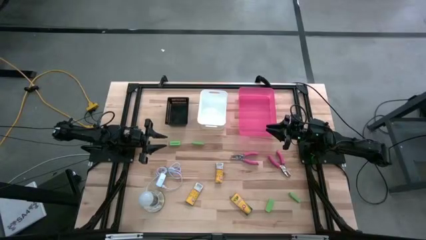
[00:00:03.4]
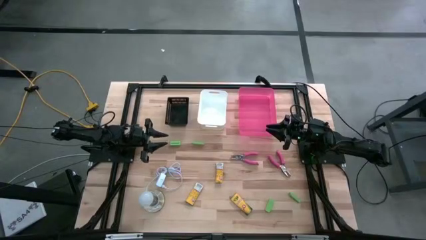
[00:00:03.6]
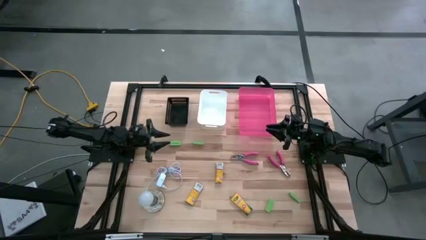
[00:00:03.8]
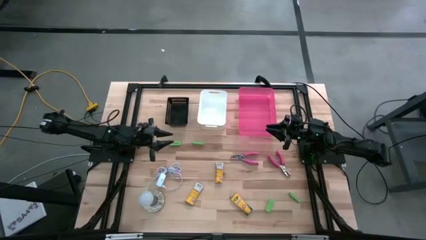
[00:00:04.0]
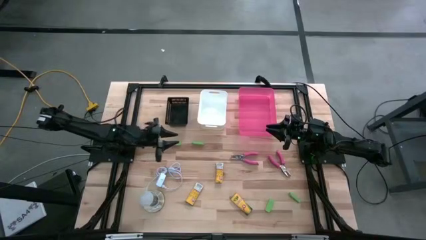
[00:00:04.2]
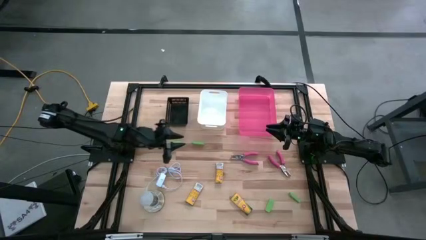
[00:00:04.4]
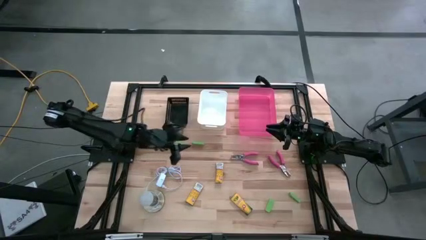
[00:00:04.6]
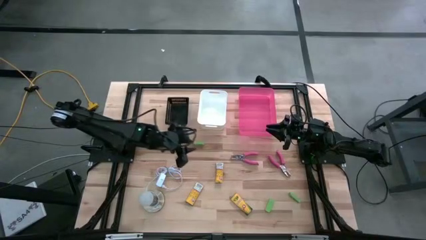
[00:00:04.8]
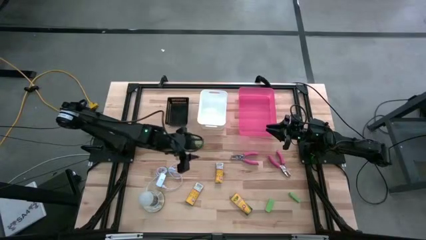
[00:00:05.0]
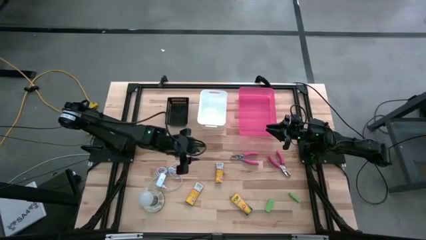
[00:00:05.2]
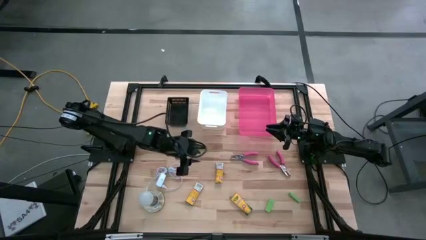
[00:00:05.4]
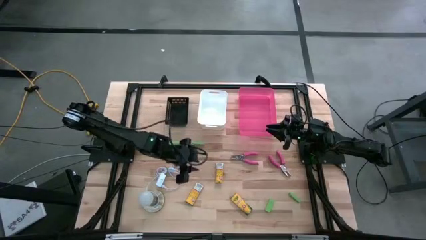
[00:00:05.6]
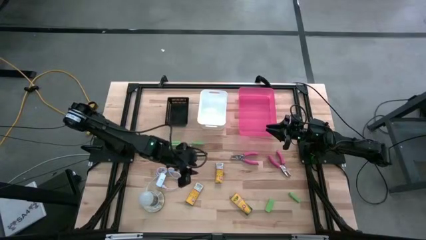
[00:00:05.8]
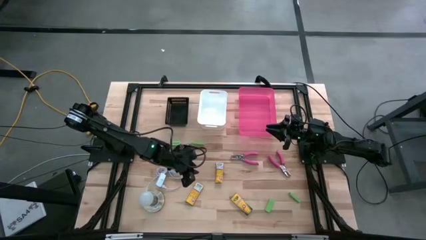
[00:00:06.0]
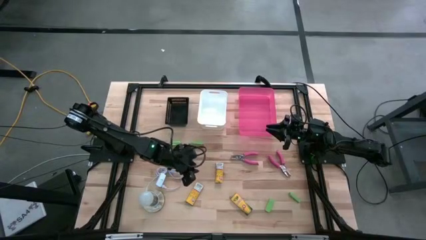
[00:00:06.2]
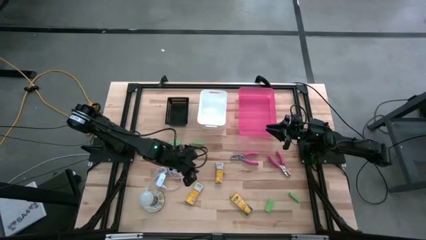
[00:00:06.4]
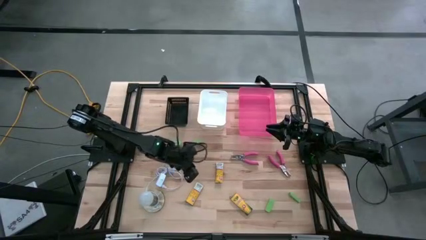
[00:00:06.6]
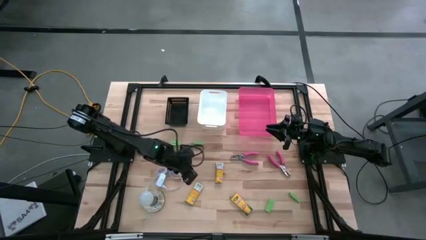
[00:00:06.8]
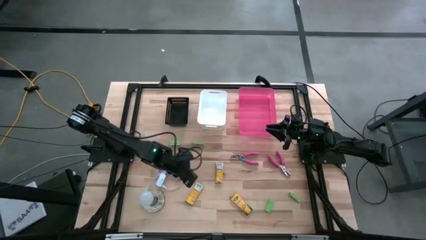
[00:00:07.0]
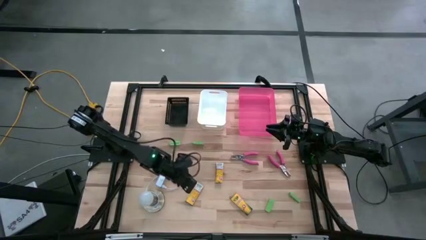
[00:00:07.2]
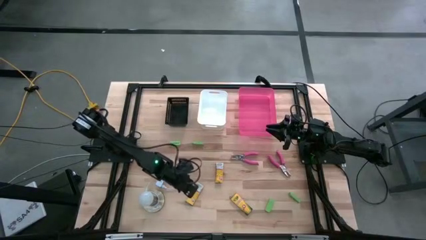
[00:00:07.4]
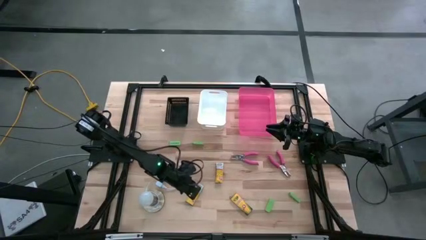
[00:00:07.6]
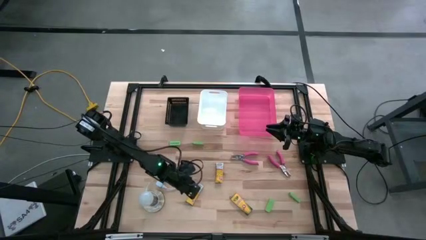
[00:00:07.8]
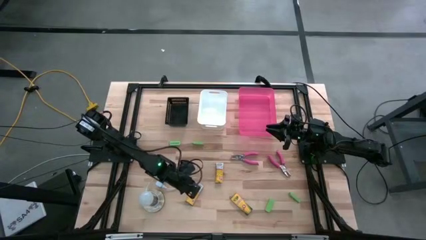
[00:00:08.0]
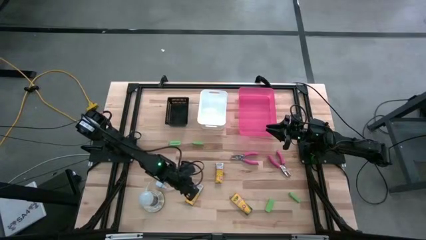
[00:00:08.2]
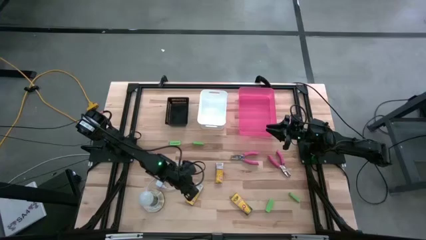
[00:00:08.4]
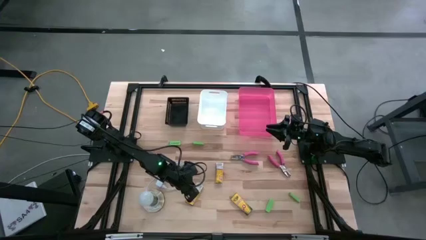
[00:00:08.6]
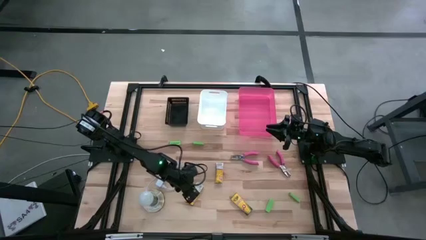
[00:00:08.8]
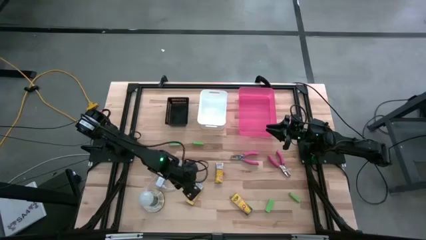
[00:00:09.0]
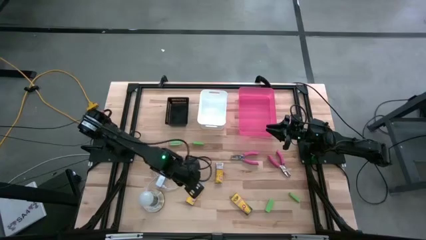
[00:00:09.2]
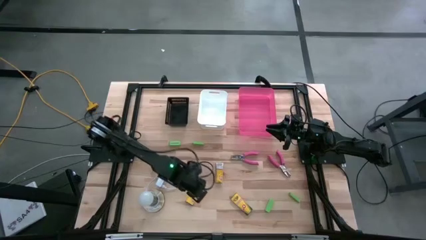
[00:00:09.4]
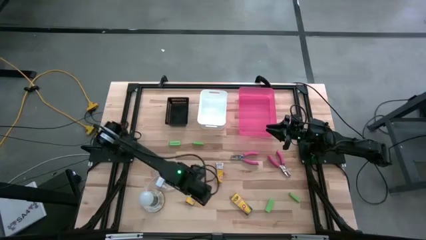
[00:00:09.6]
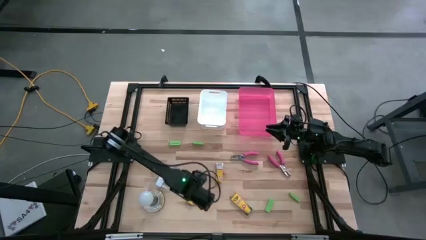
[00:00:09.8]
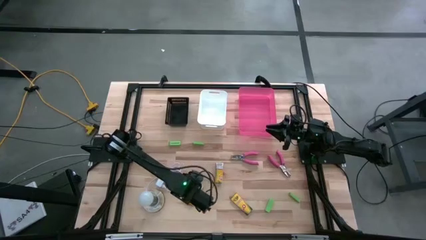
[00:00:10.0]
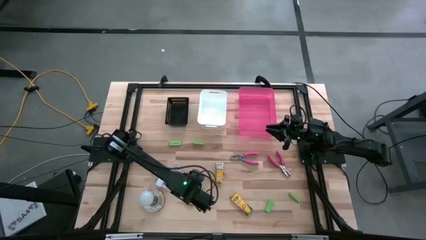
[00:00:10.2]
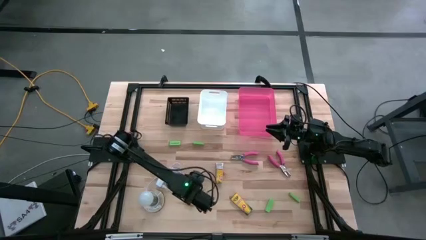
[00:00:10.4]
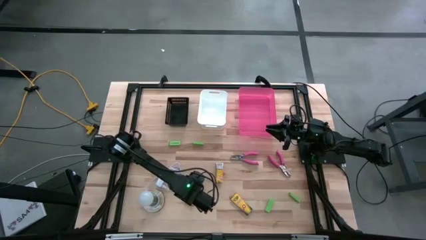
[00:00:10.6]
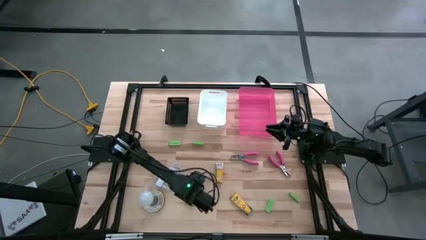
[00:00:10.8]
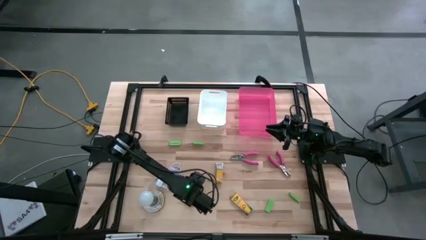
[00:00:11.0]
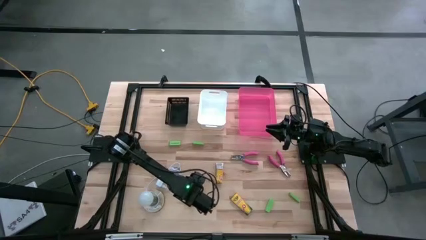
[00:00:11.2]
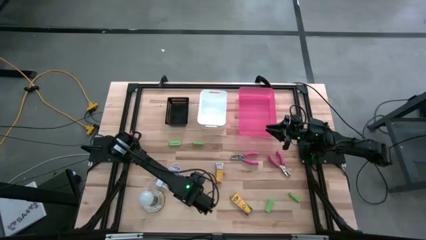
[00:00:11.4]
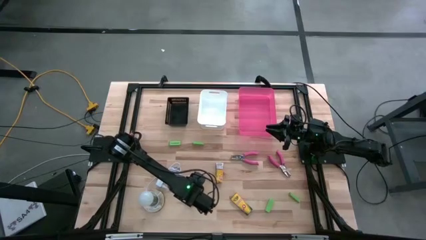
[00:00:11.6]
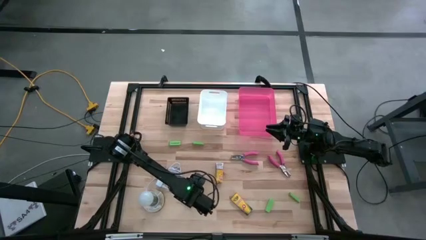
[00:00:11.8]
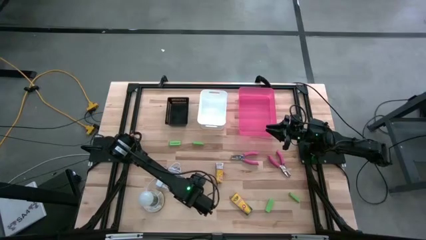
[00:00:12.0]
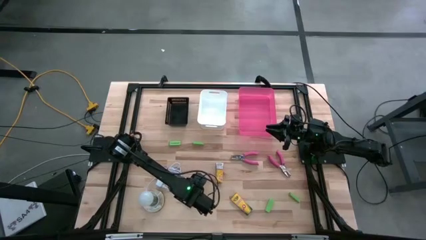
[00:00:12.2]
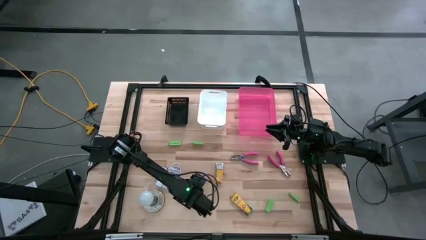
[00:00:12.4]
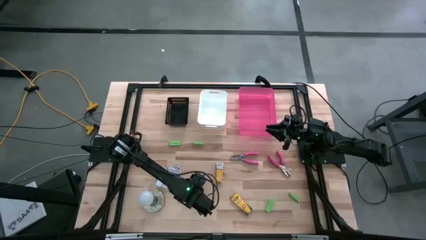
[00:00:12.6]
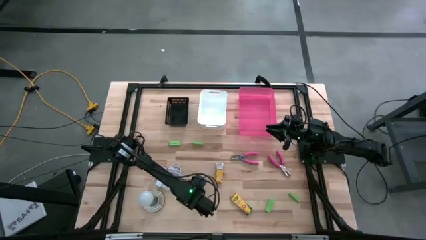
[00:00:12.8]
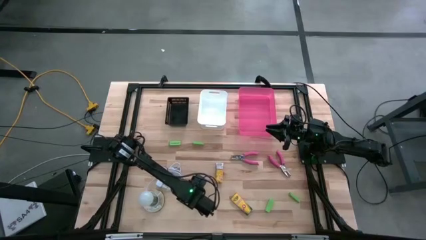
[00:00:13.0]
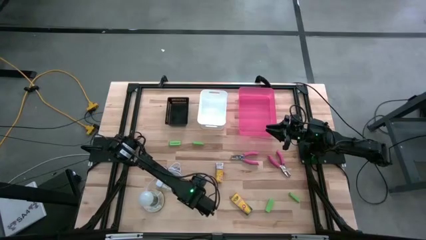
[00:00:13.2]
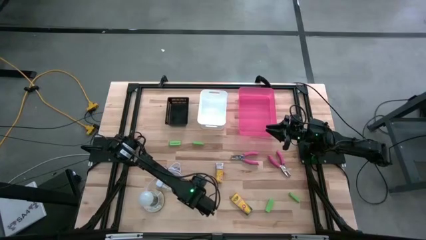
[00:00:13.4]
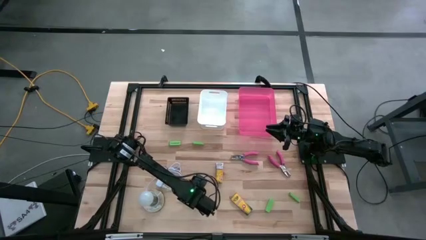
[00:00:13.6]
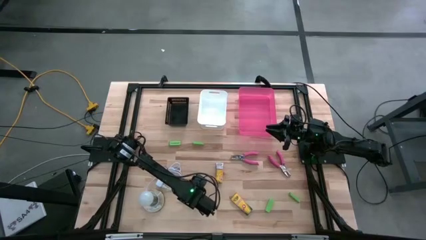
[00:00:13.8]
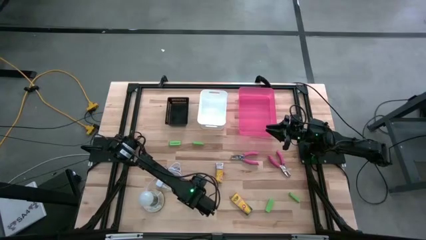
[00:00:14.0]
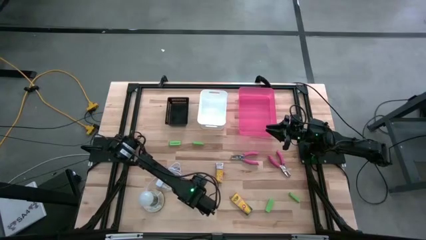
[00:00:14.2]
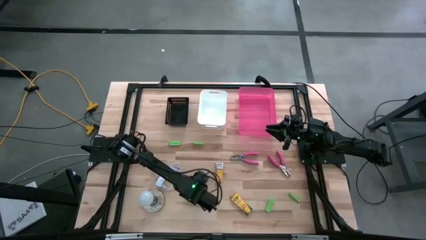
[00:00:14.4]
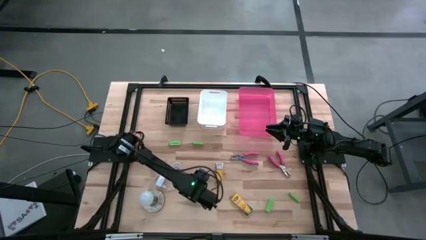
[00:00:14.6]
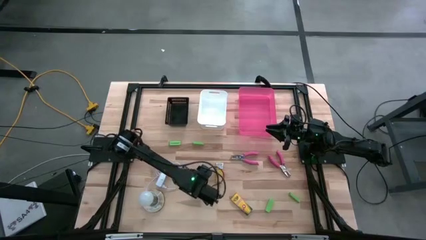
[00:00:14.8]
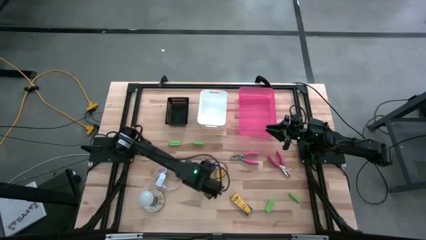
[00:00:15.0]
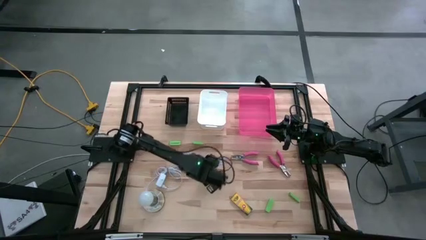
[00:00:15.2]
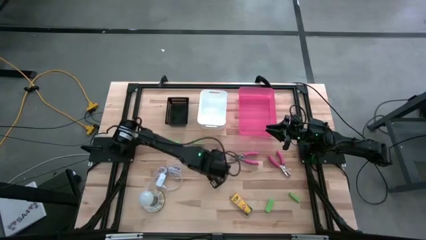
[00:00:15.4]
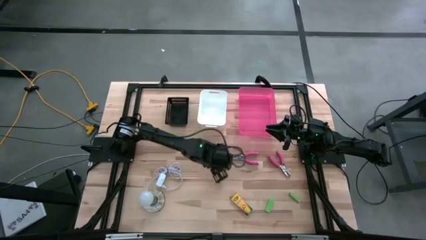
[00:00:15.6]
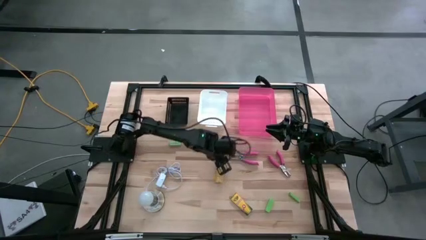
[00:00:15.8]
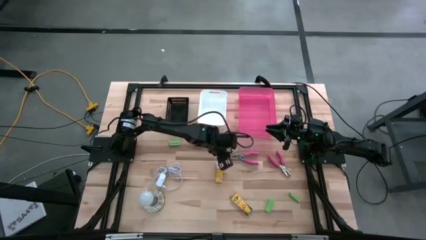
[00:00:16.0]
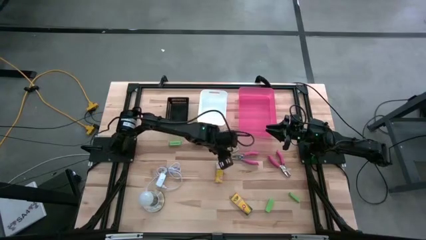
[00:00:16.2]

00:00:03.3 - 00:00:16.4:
Task: Pick & Place School Supplies
Put the left crayon box into the pink bin
